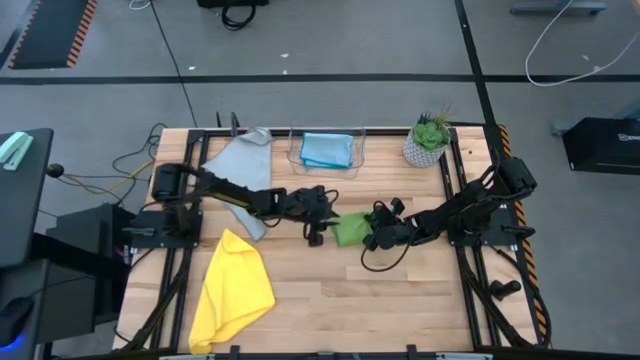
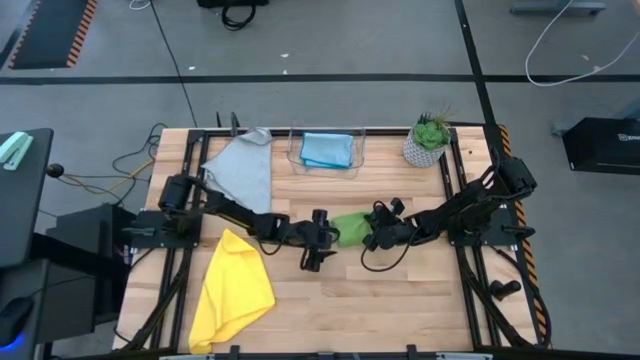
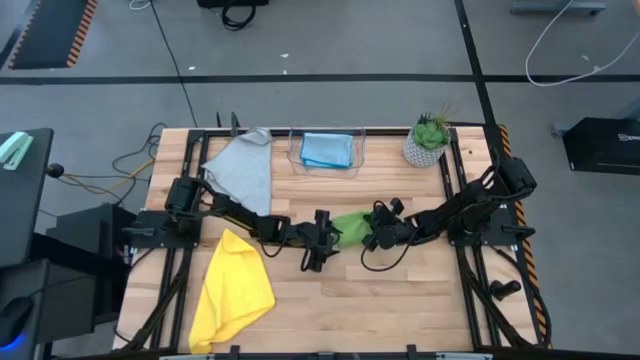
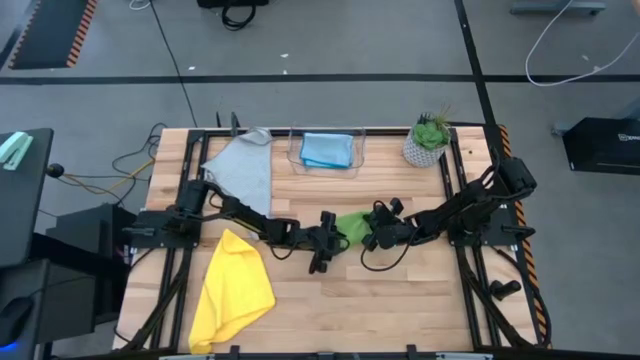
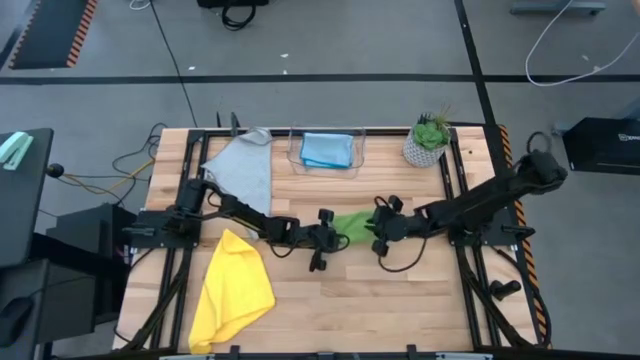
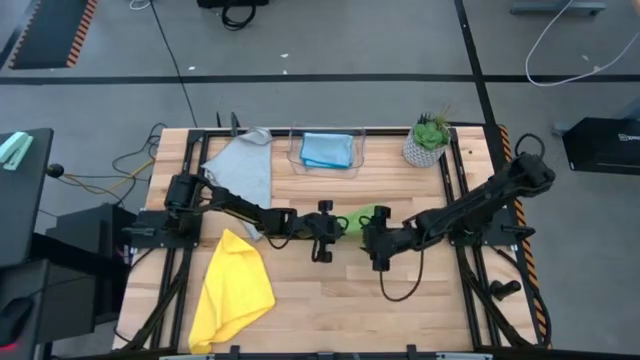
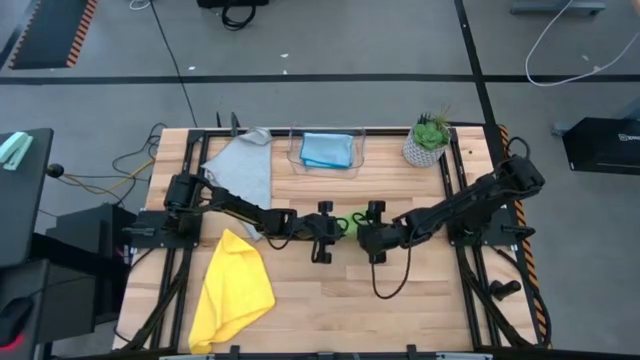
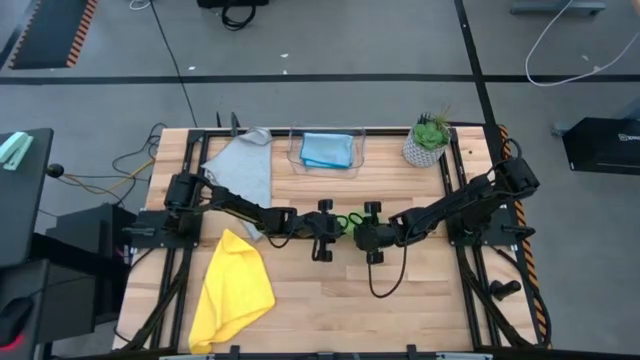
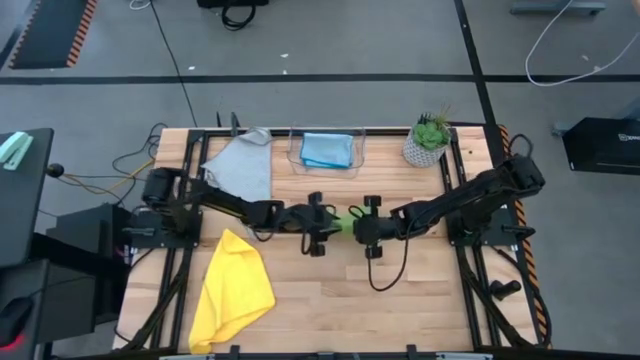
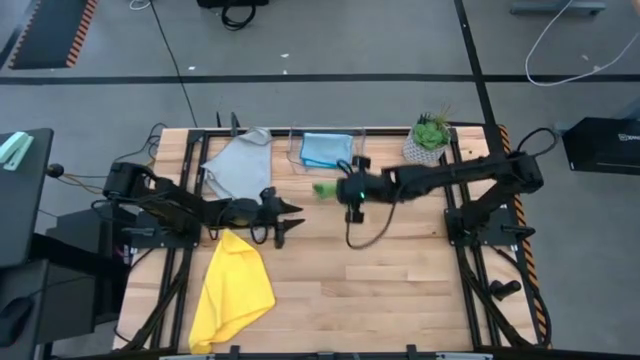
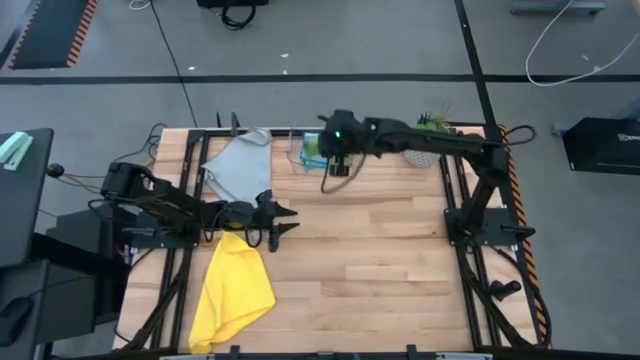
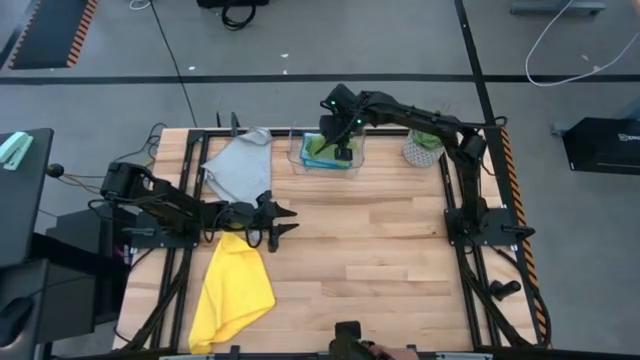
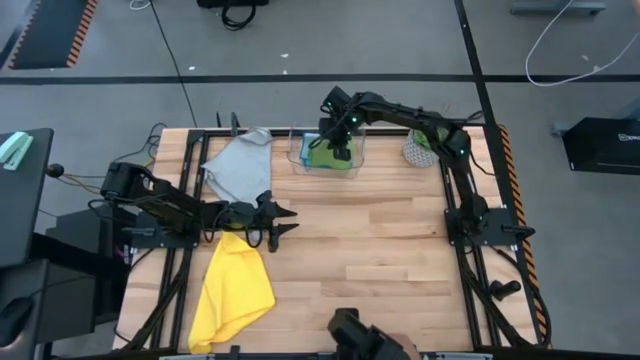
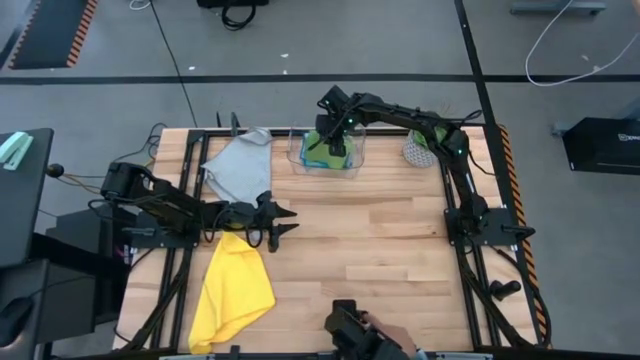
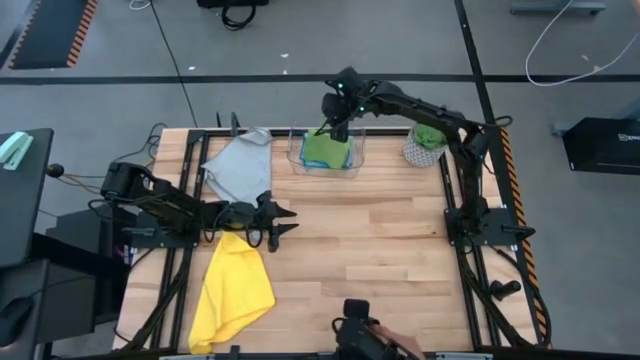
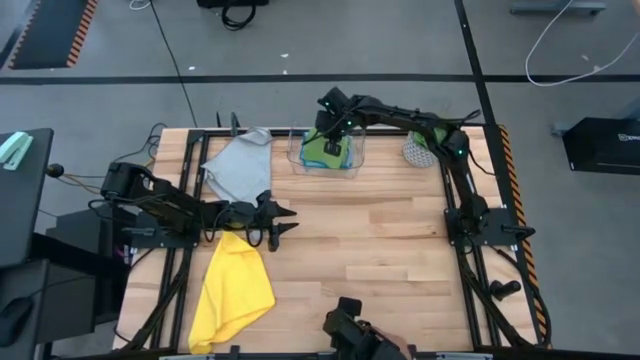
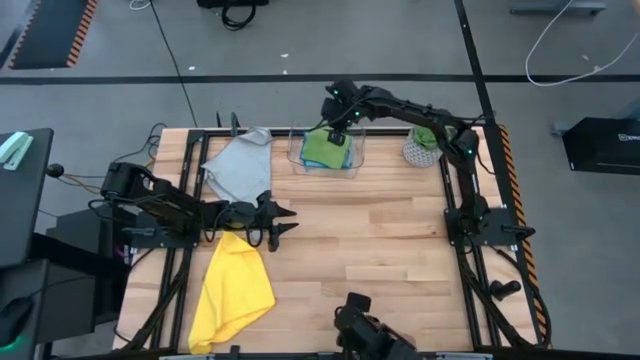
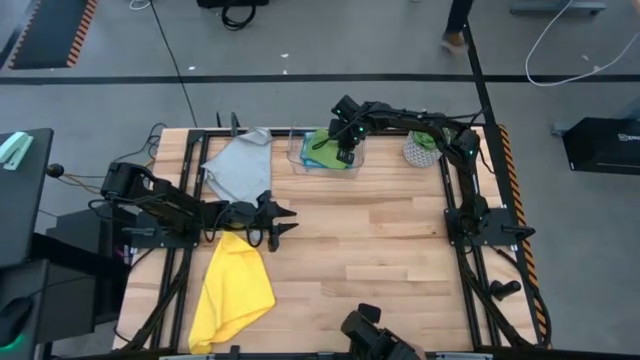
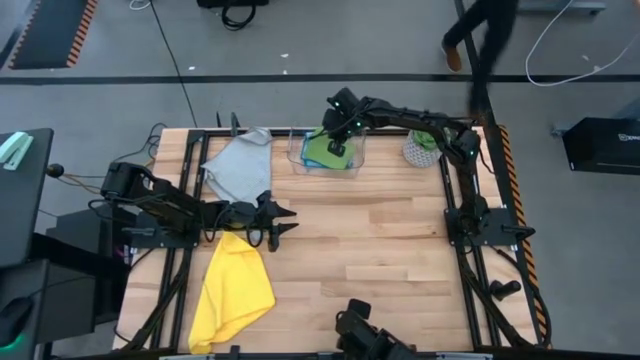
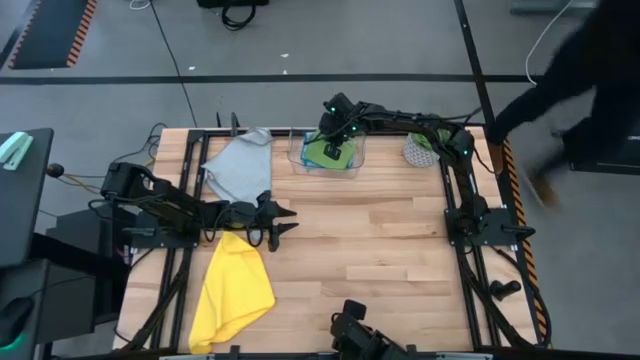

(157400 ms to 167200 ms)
Task: Fold microfiber towels
Put the folded green microfiber towel into the transparent bin

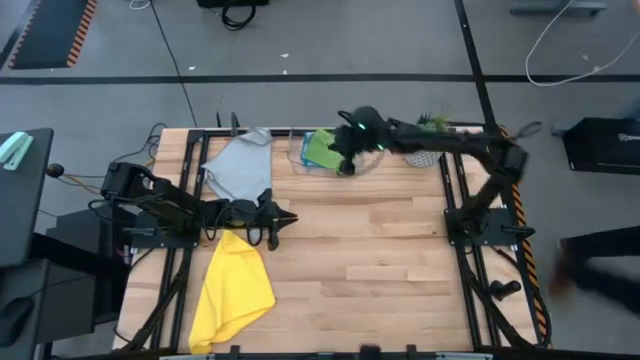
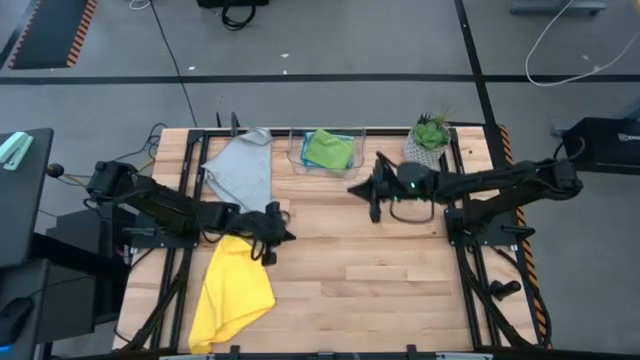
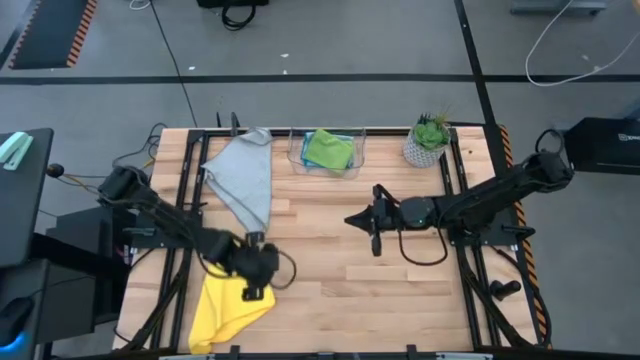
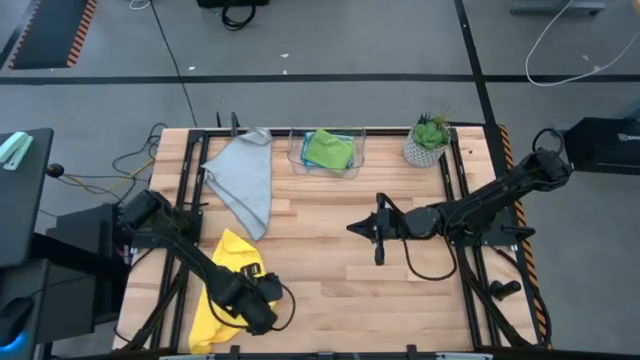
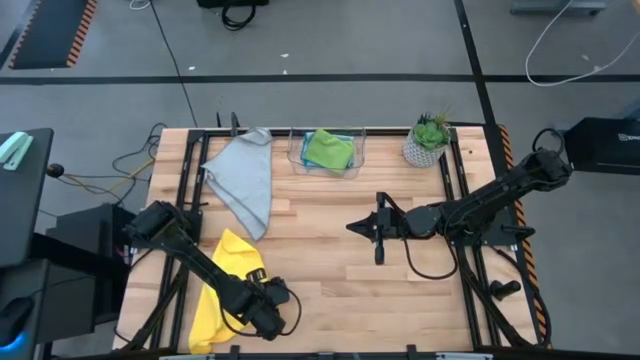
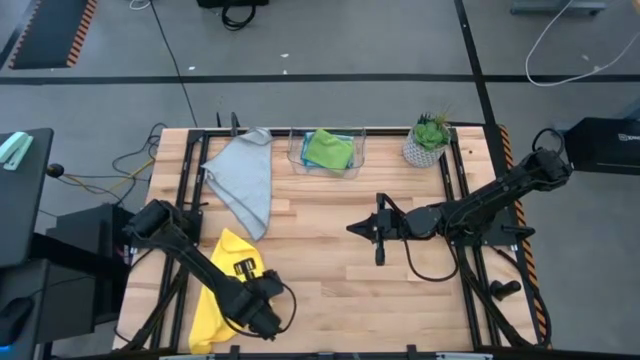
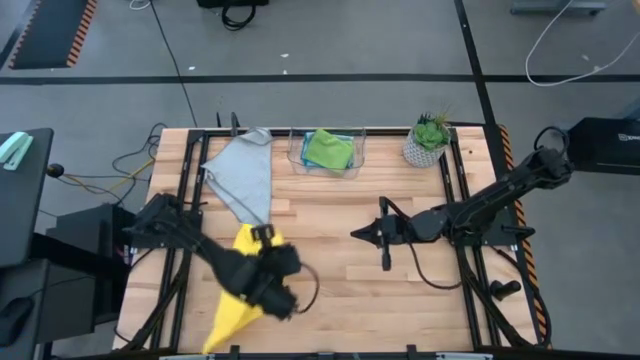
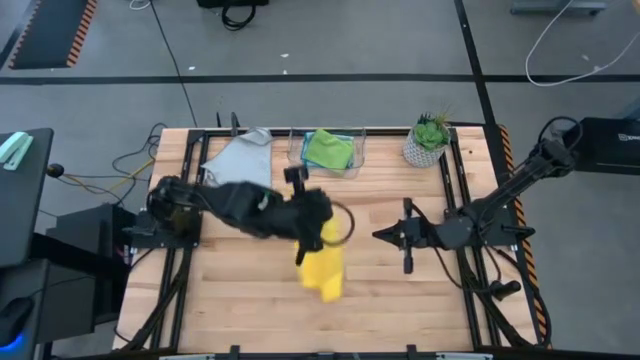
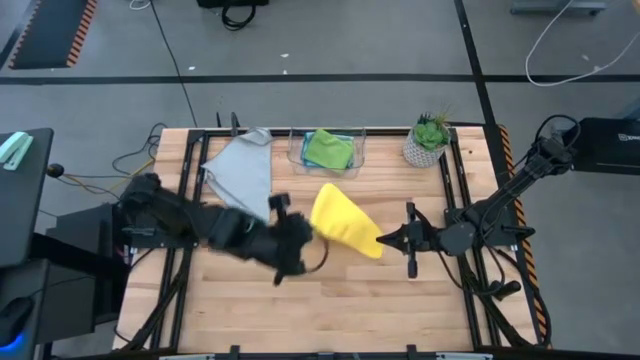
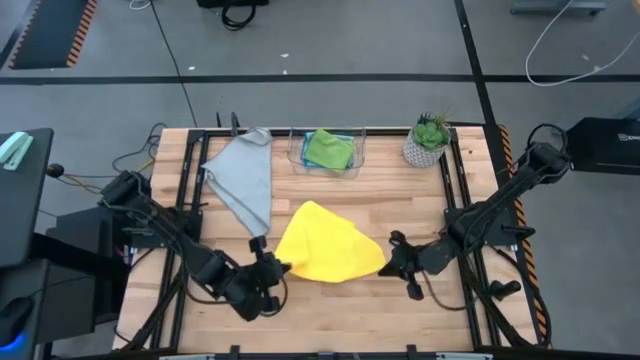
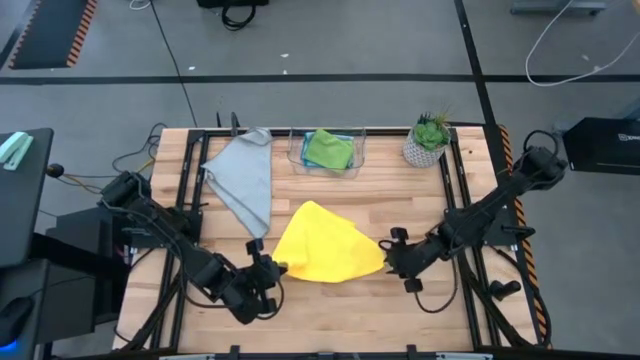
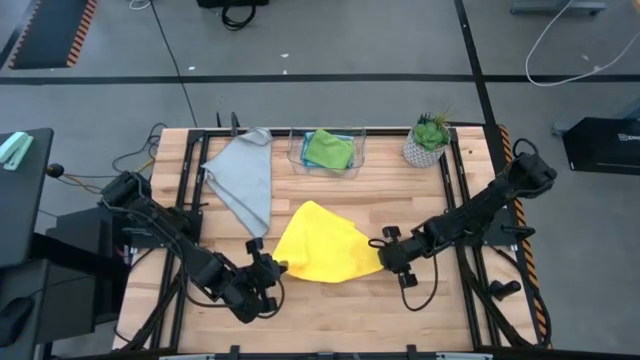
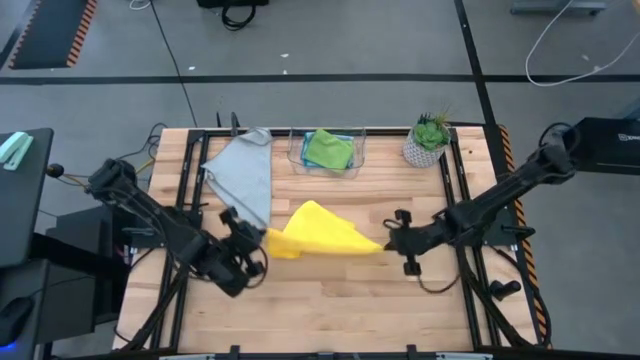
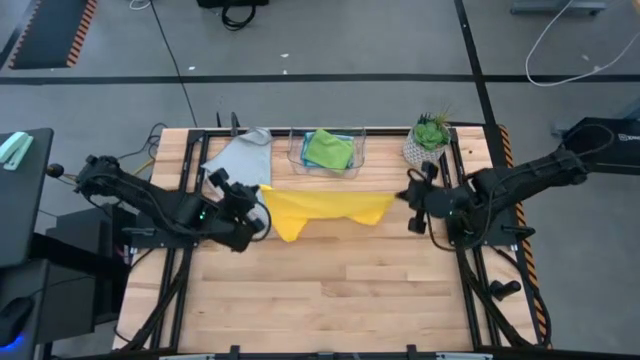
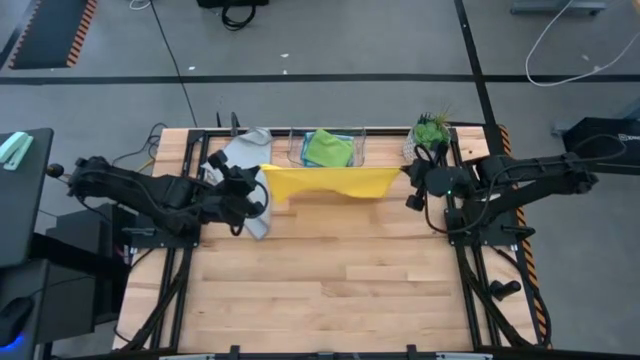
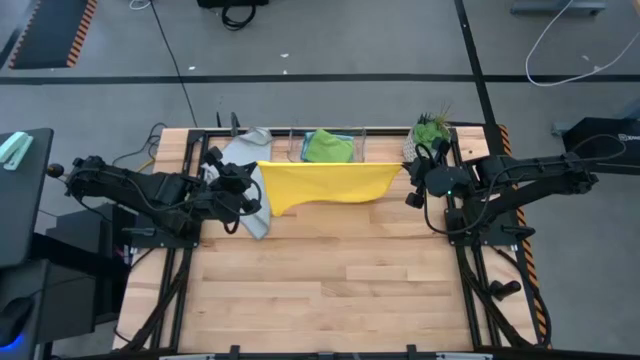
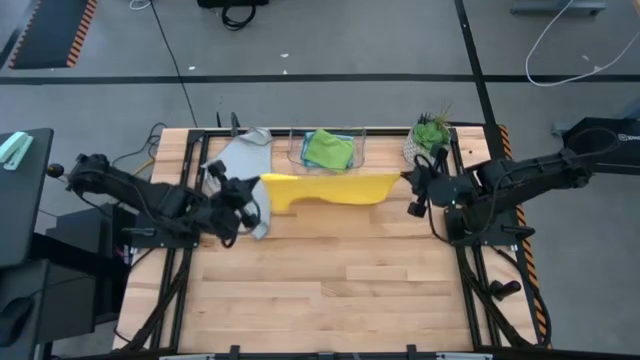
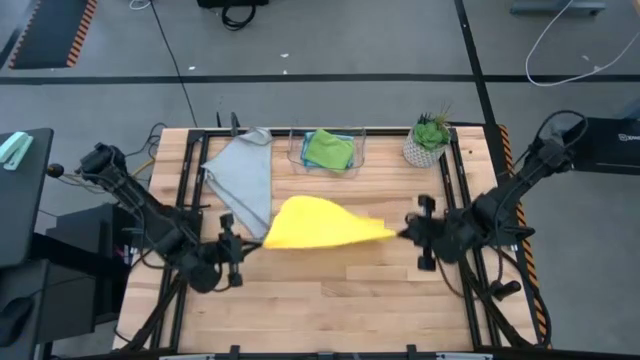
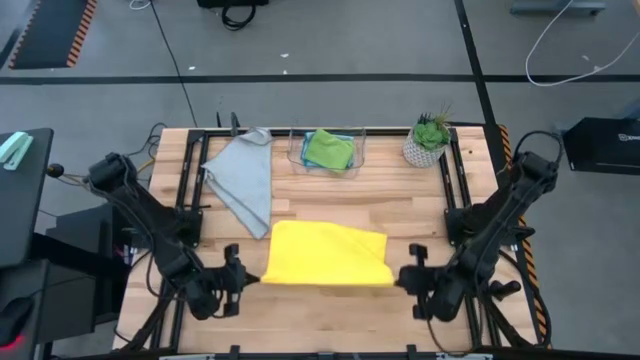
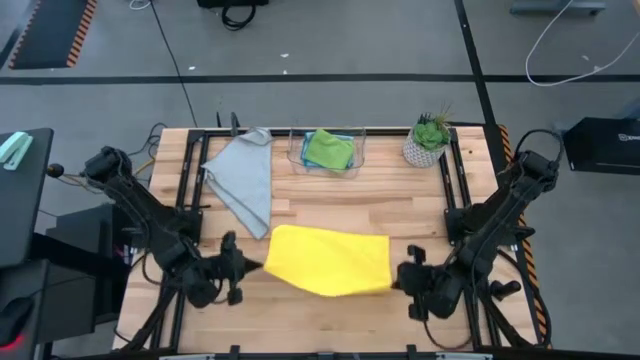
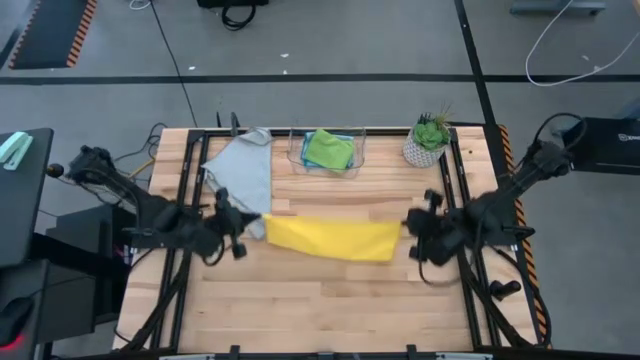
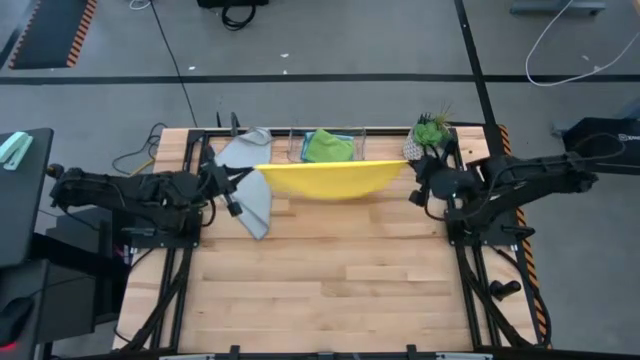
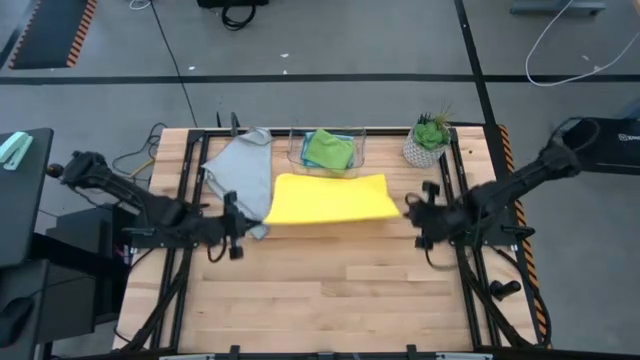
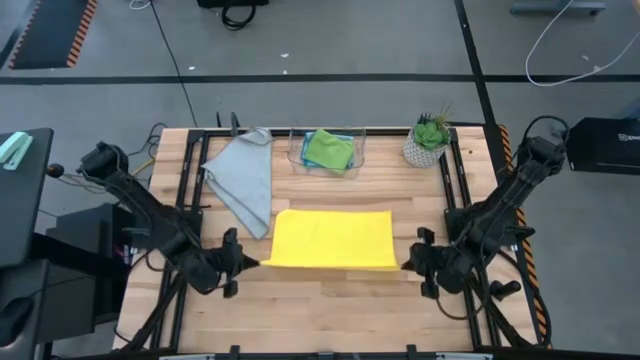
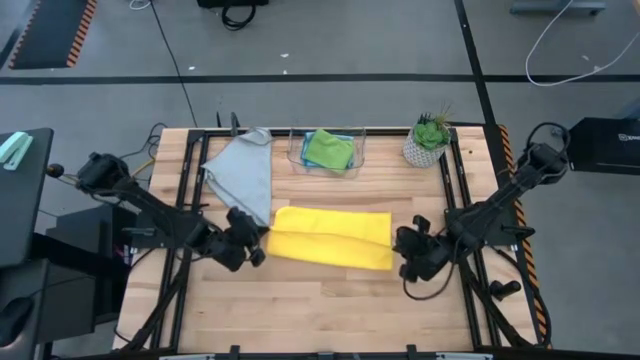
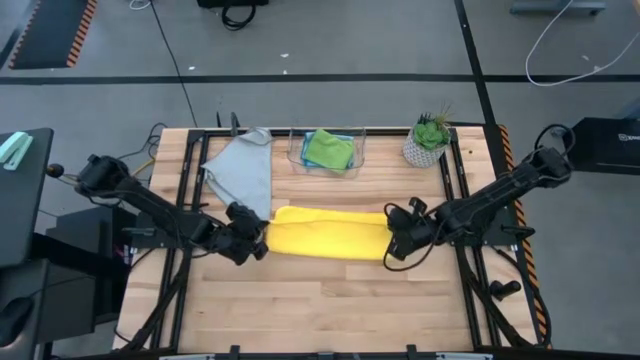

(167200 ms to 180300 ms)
Fold the yellow microfiber towel
